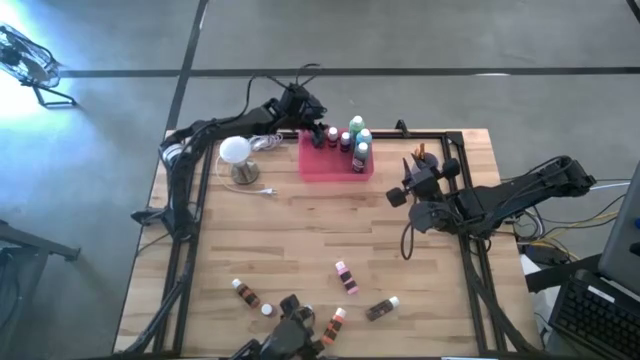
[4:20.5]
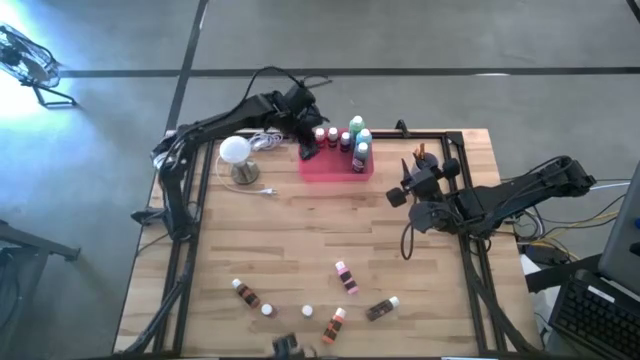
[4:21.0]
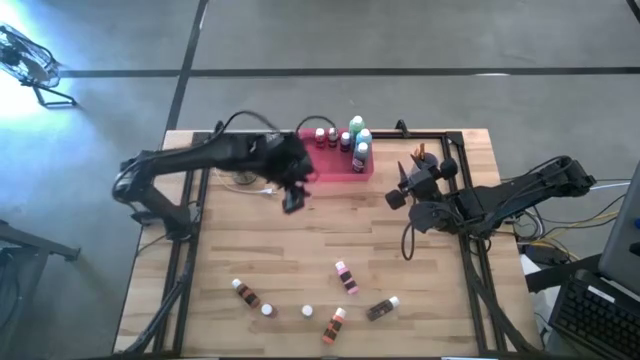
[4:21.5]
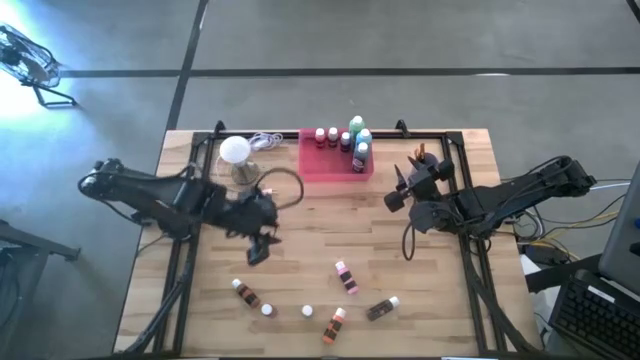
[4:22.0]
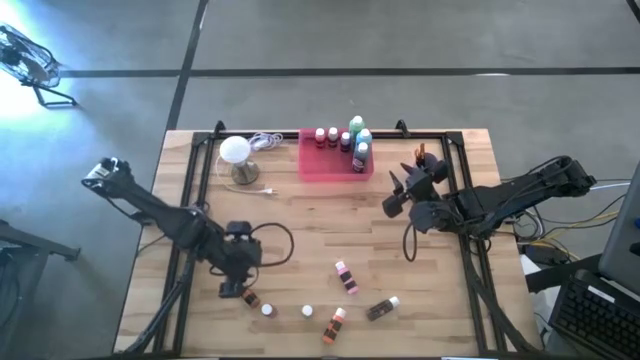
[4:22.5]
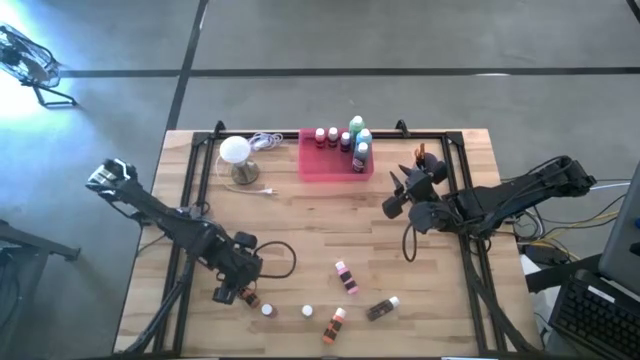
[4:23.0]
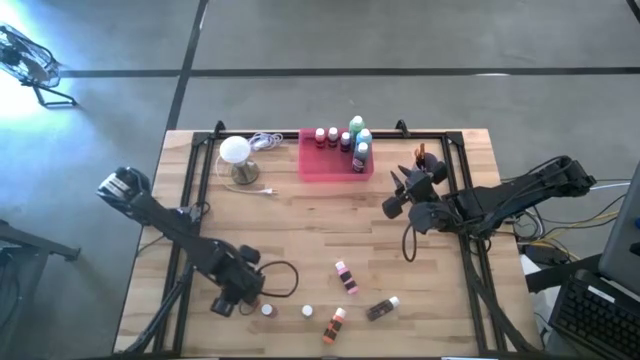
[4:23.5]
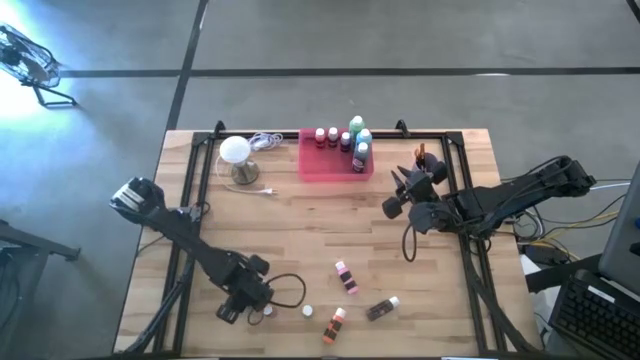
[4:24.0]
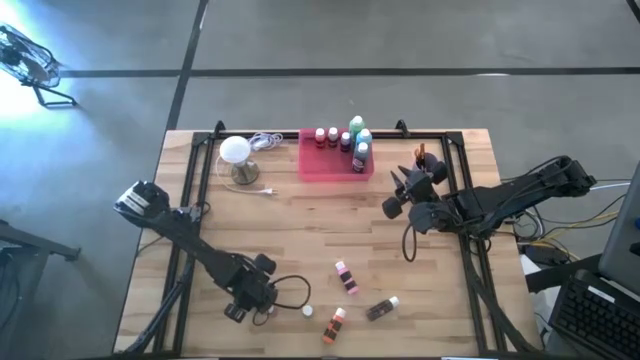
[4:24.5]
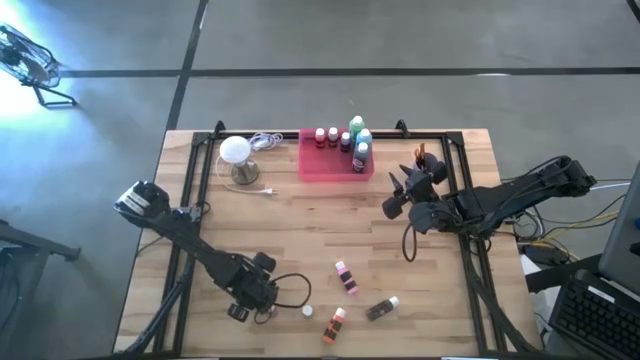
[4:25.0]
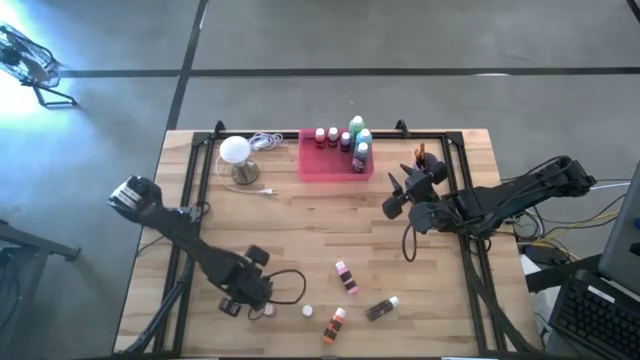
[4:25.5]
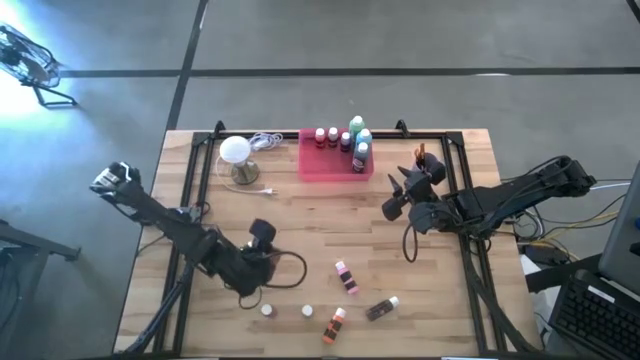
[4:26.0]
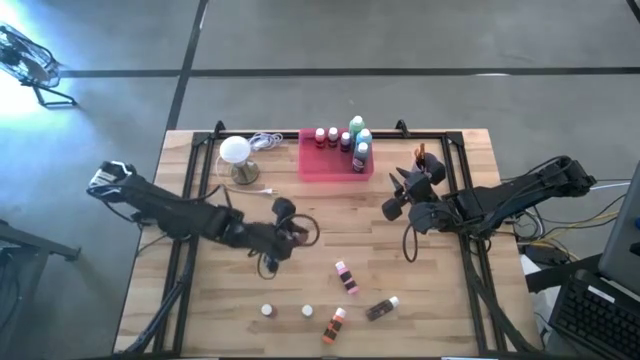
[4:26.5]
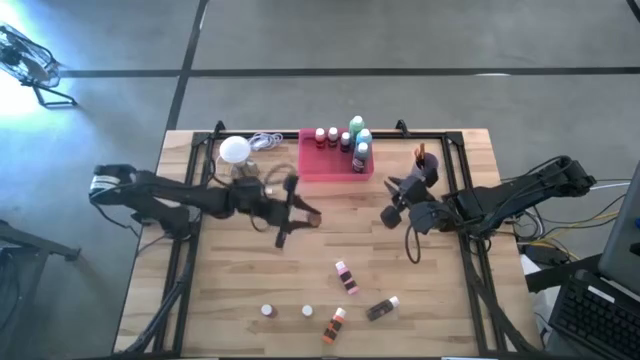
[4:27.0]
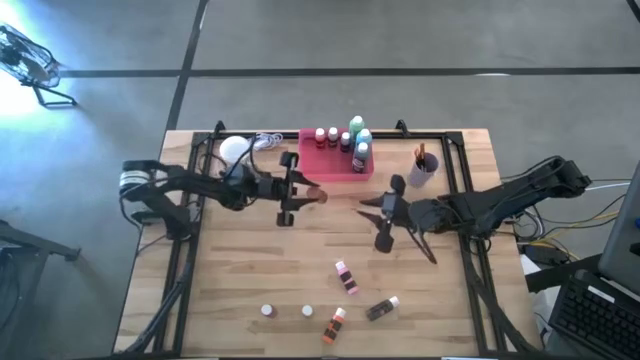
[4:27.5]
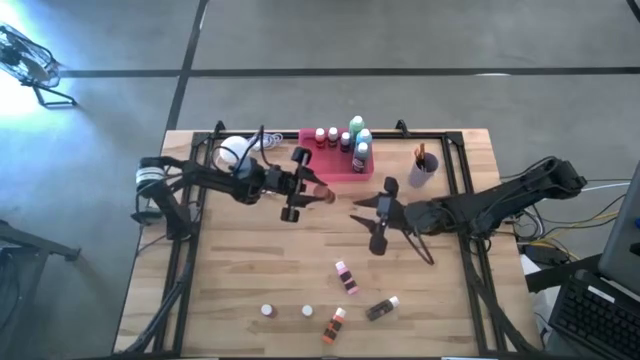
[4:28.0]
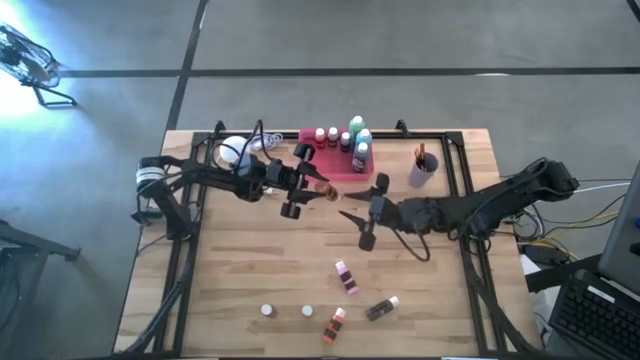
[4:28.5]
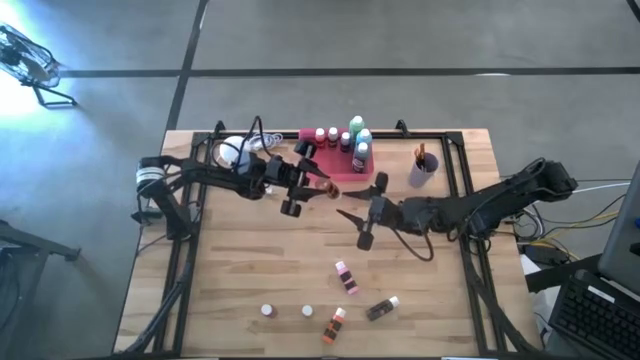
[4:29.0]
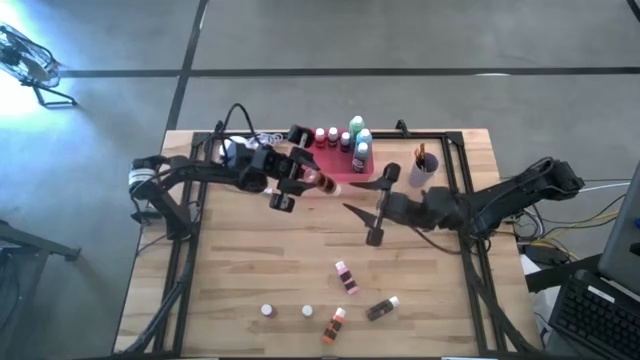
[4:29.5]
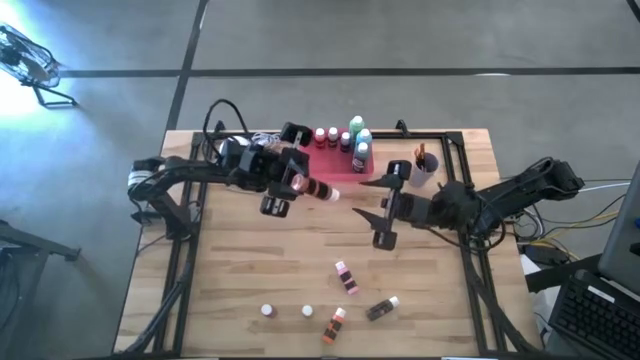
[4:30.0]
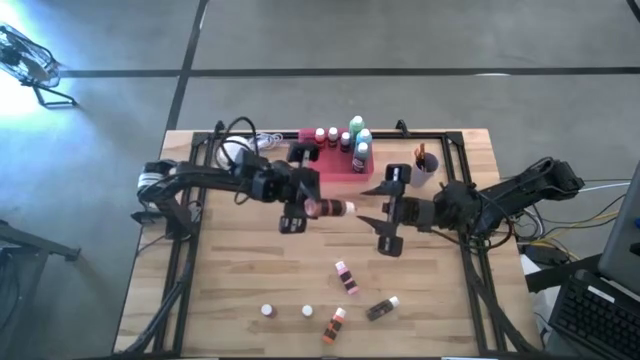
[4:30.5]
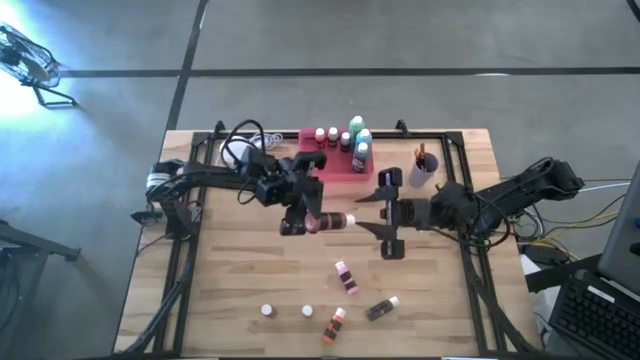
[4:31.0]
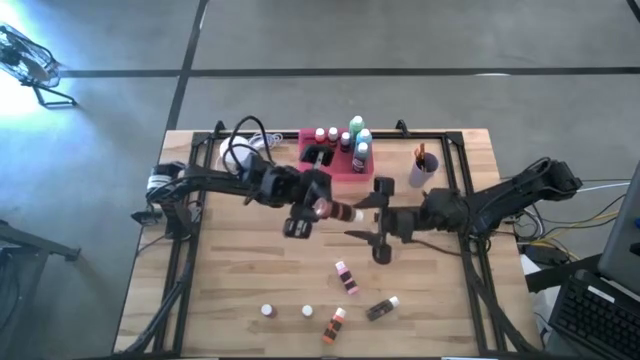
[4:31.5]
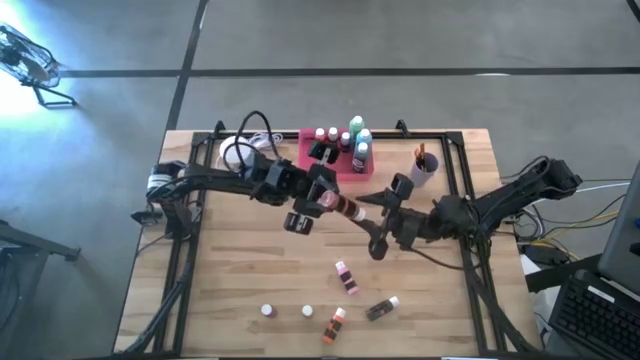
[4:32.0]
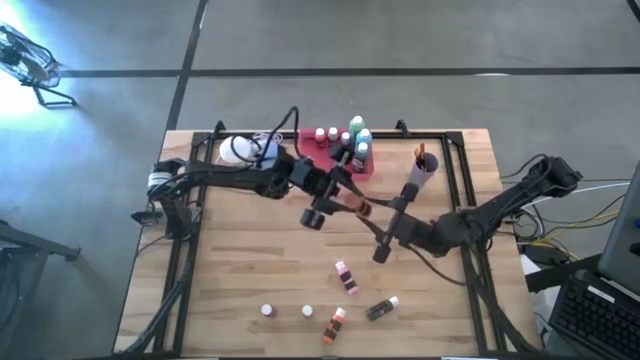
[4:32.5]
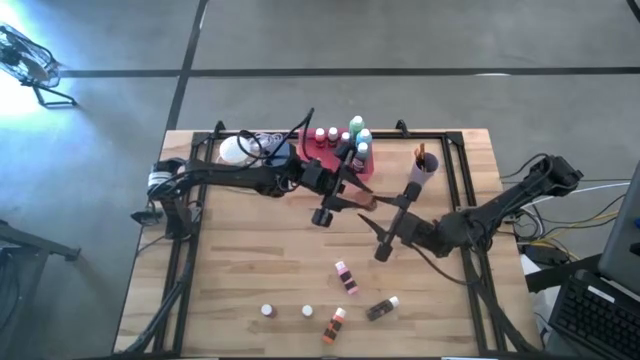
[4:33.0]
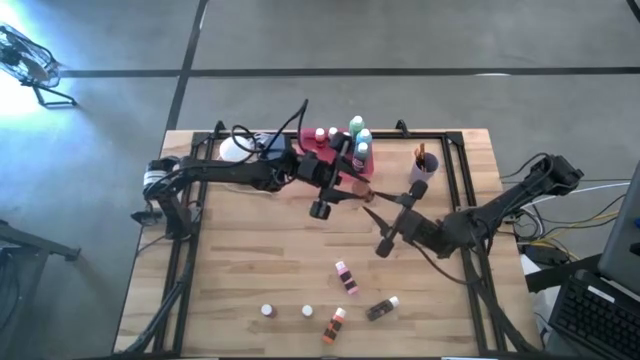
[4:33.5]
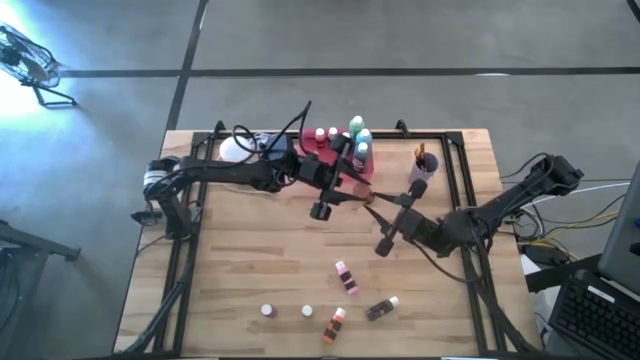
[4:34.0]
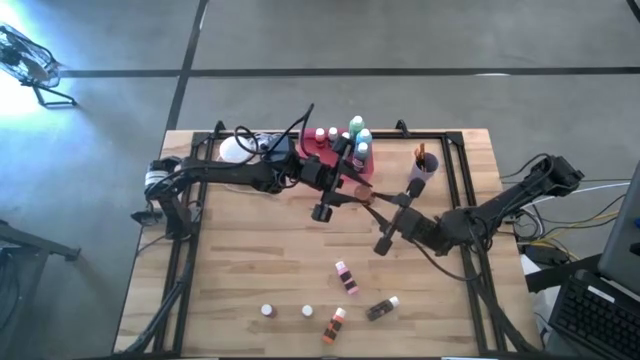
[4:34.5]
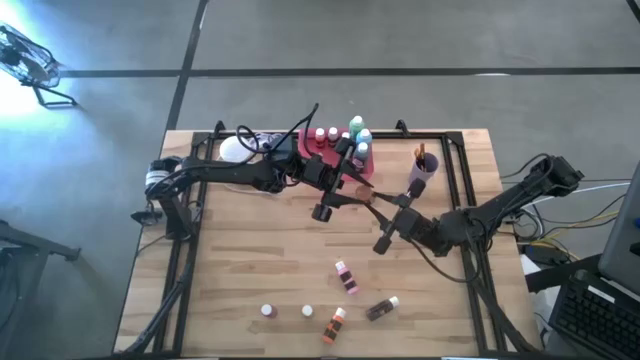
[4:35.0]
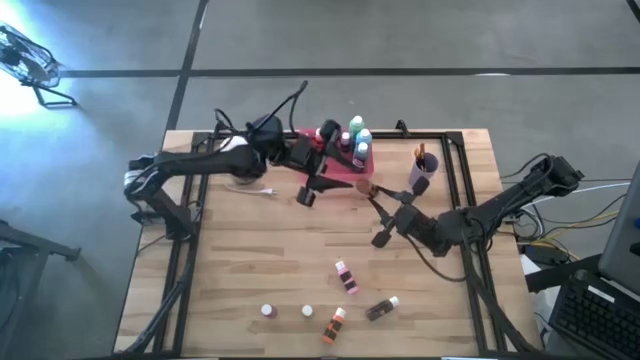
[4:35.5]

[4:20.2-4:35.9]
Task: Pick & Place Paint Supplies
Put the brown black paint bottle into the pink bin

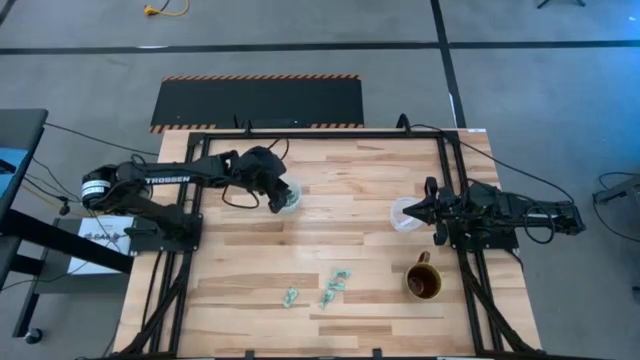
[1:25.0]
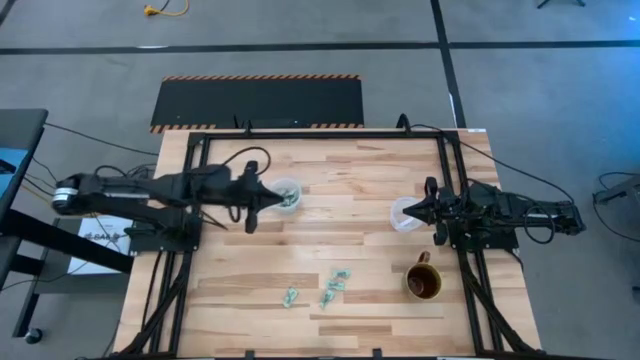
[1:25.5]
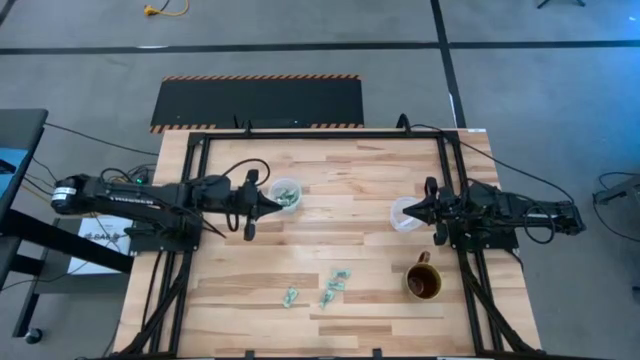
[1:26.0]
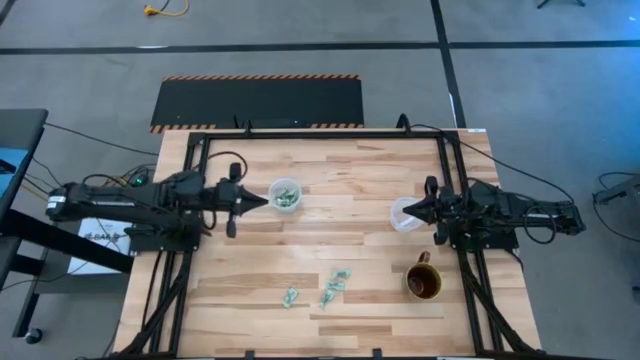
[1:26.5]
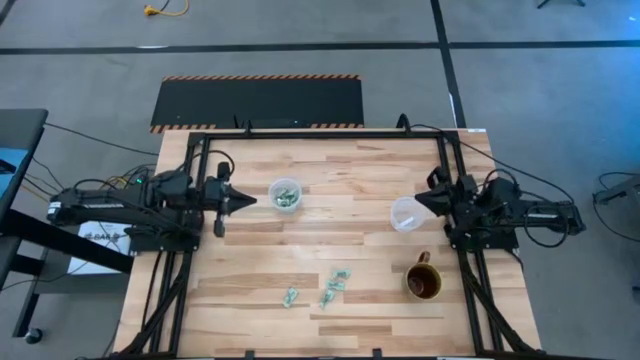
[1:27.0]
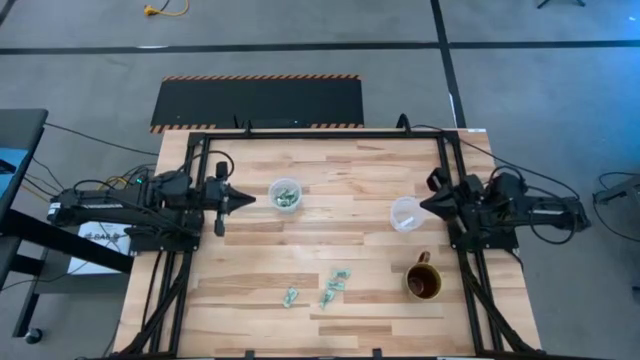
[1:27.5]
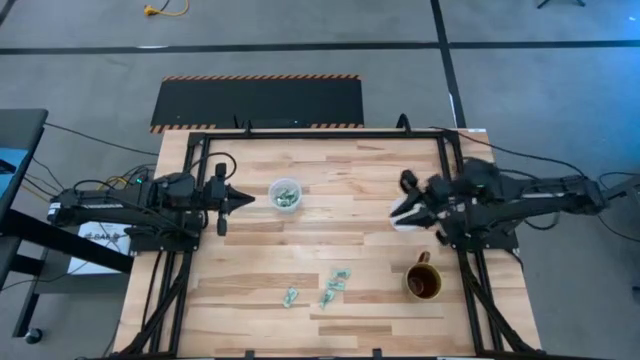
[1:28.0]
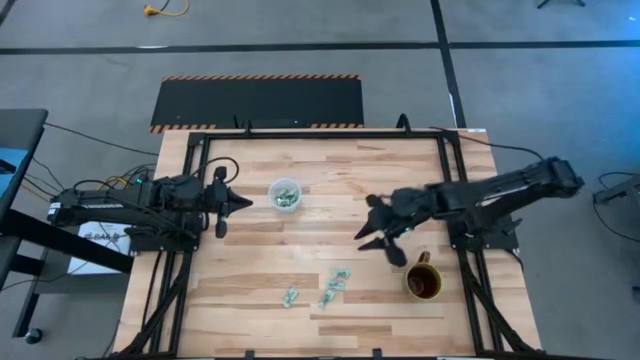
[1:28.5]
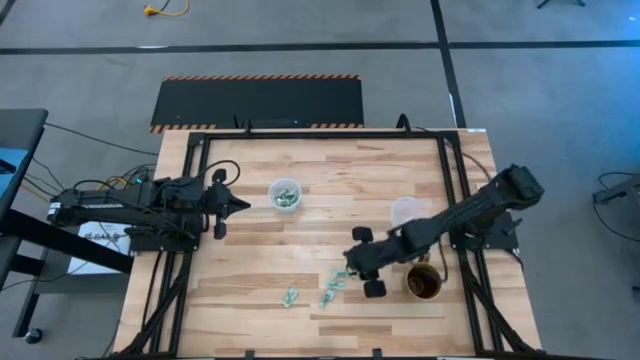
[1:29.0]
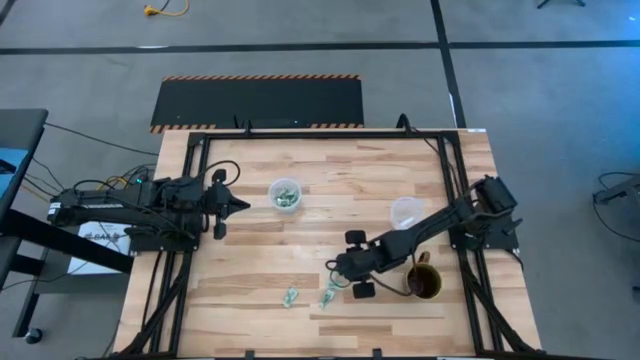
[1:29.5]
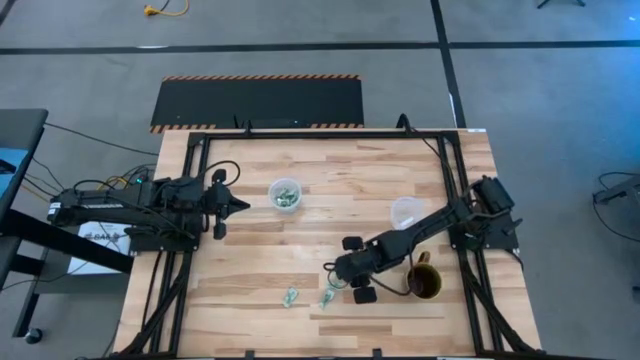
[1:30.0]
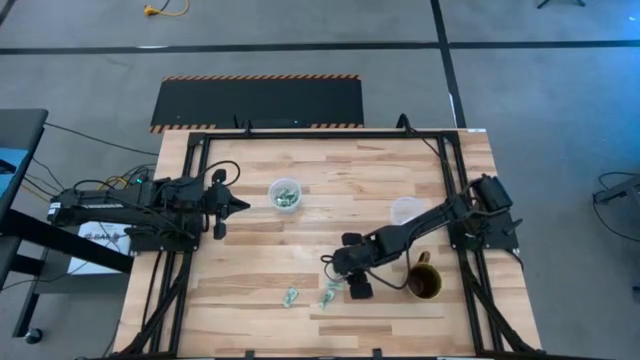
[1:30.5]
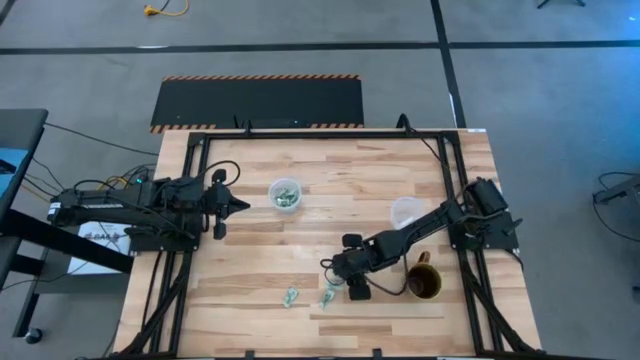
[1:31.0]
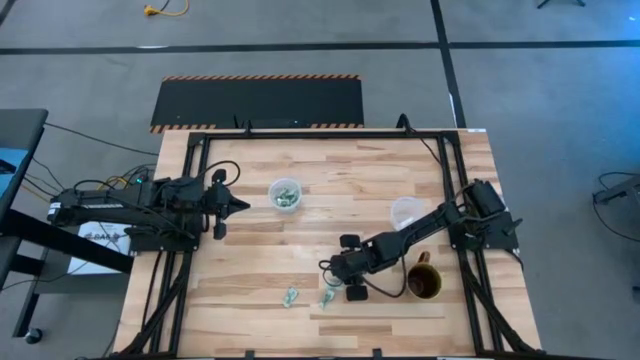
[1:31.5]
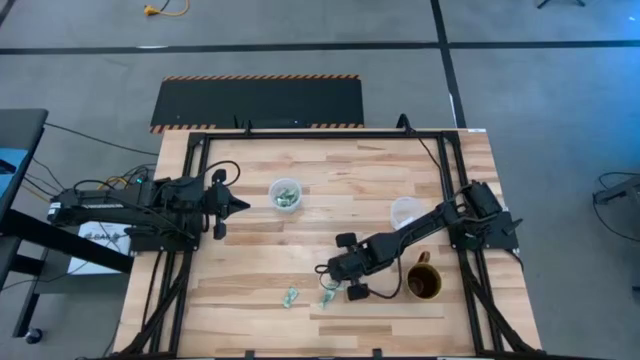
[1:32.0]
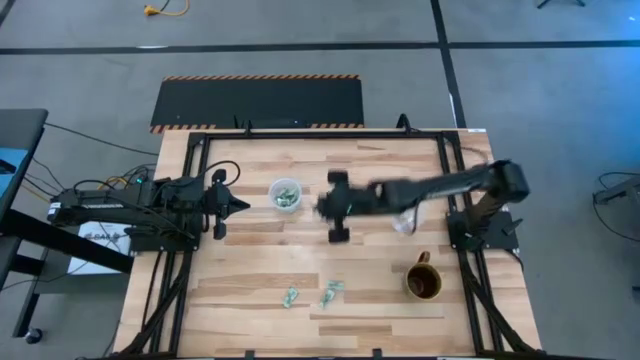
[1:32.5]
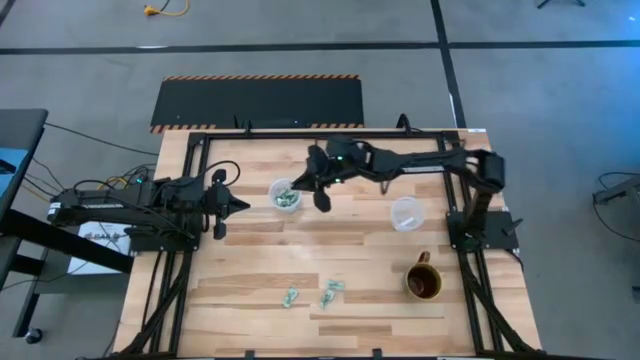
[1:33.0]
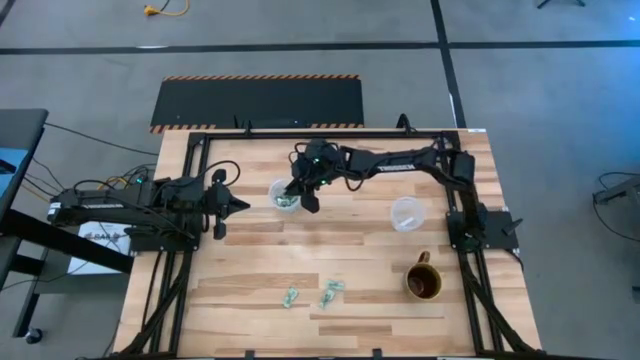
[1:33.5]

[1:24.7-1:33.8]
Task: Pick and place Stevia / Truvia into bins
Put the white stevia packet into the left transparent container
